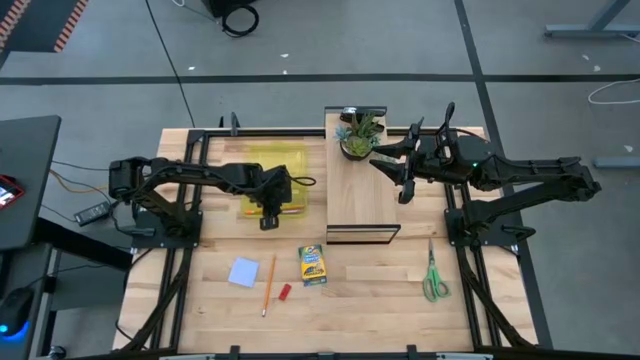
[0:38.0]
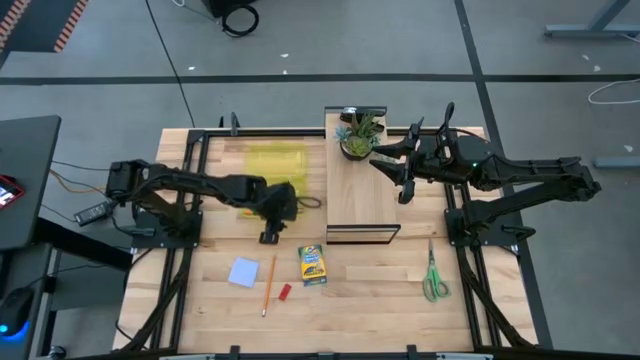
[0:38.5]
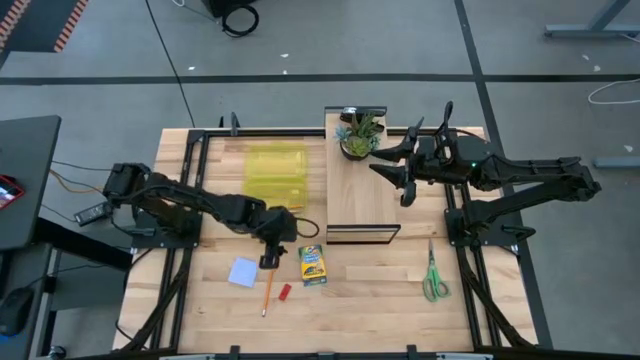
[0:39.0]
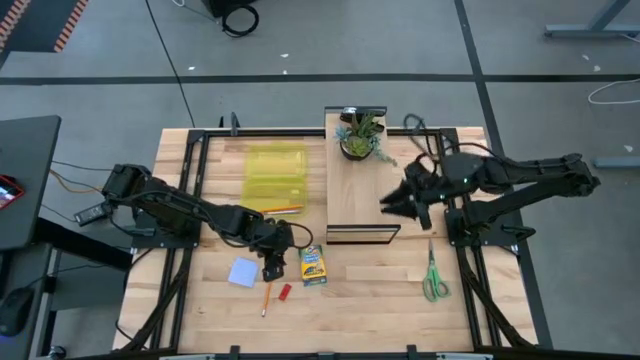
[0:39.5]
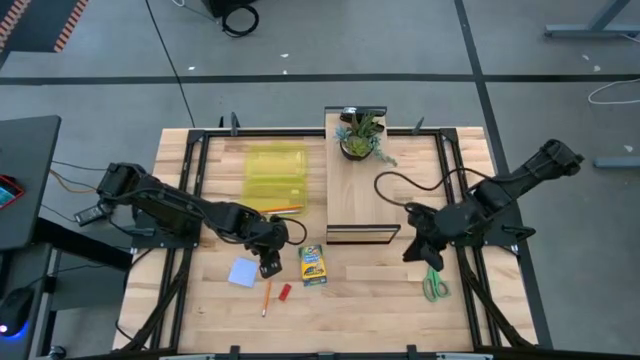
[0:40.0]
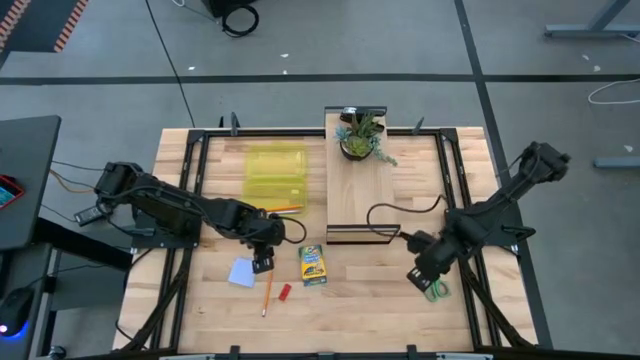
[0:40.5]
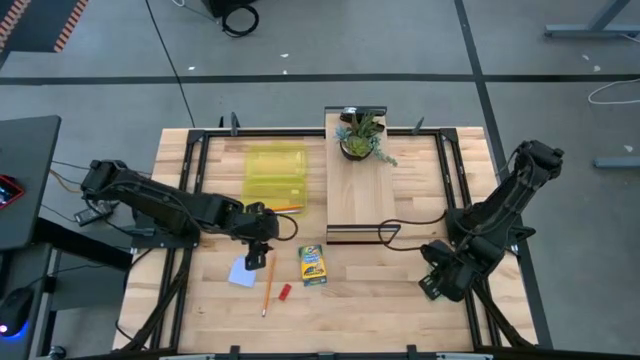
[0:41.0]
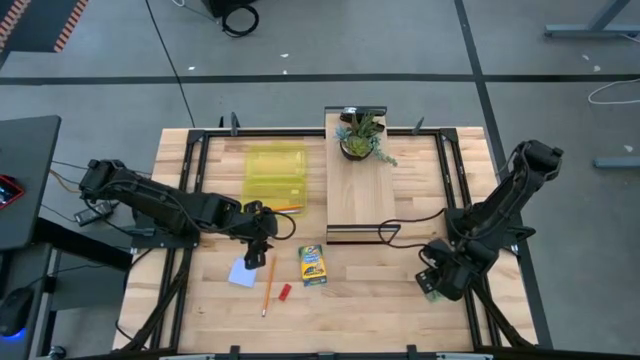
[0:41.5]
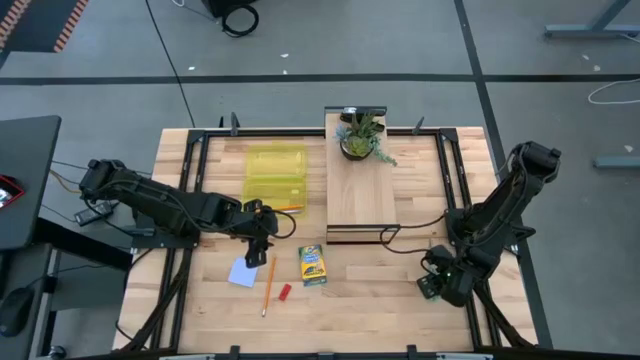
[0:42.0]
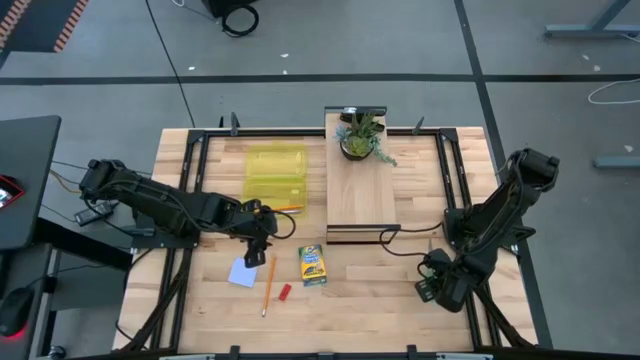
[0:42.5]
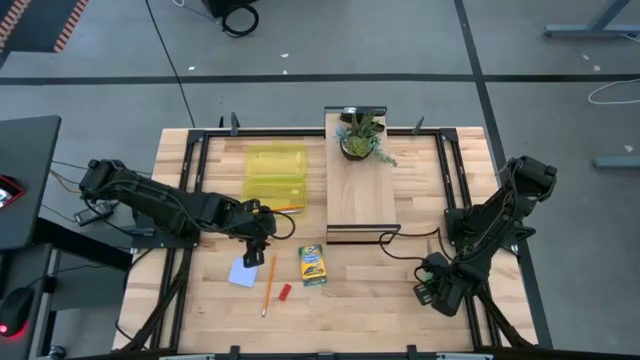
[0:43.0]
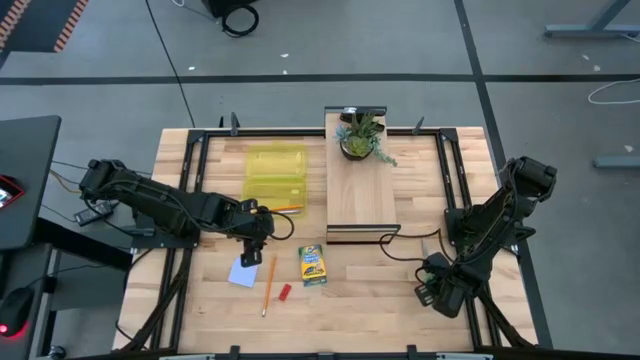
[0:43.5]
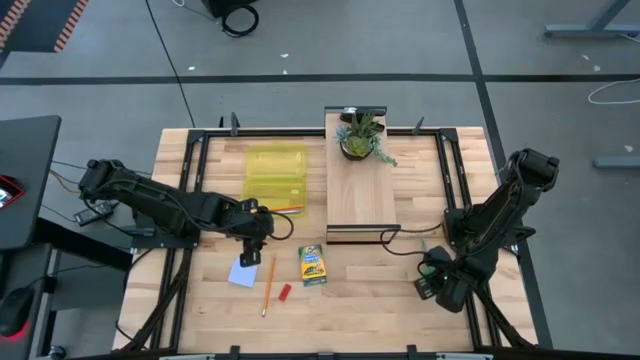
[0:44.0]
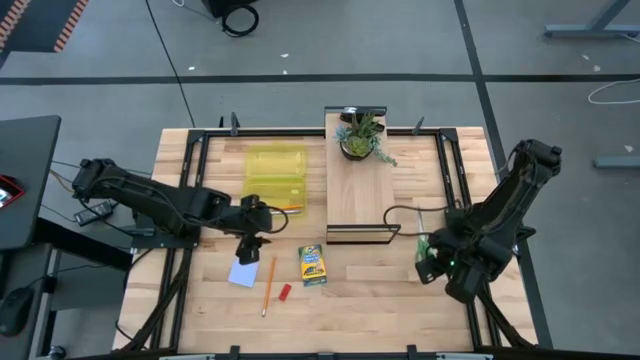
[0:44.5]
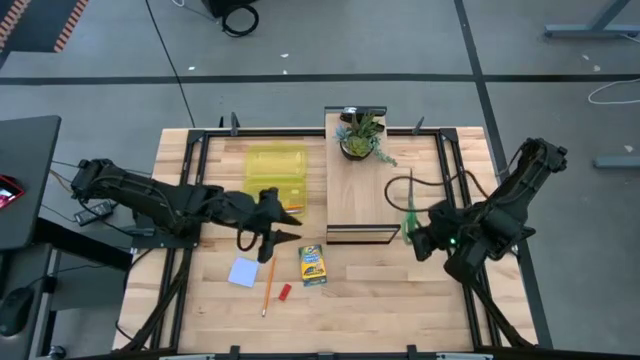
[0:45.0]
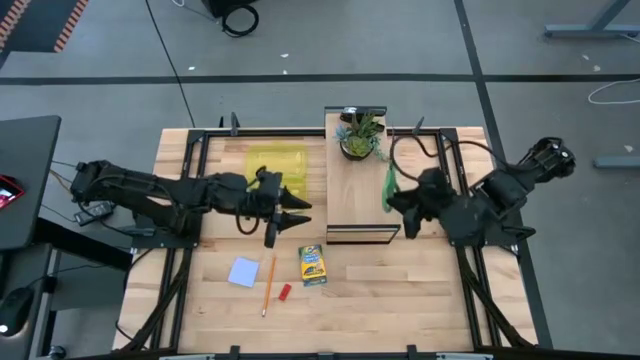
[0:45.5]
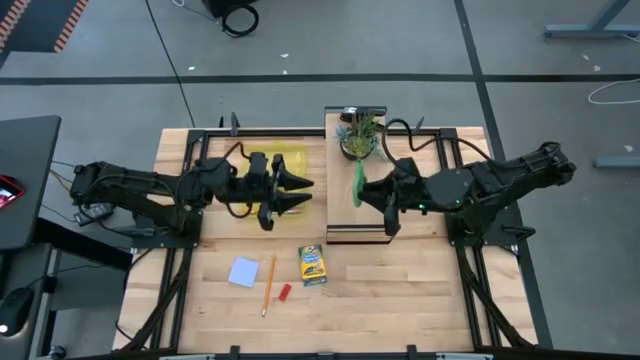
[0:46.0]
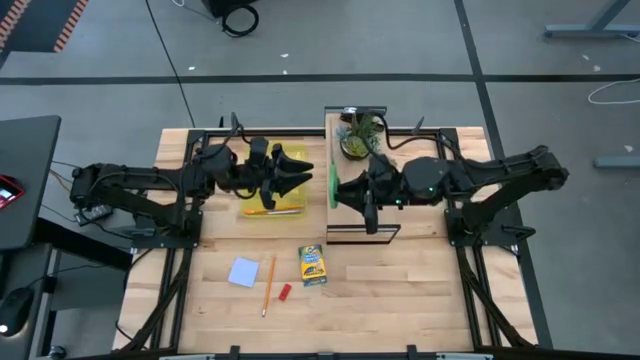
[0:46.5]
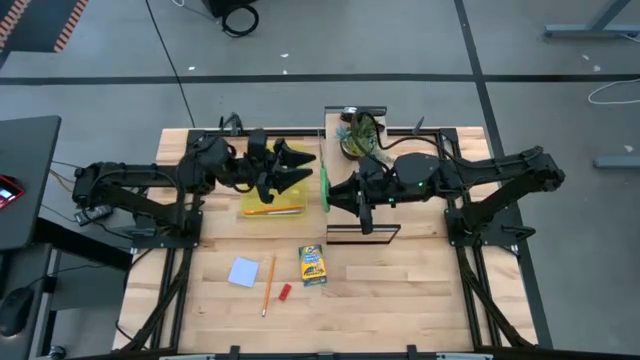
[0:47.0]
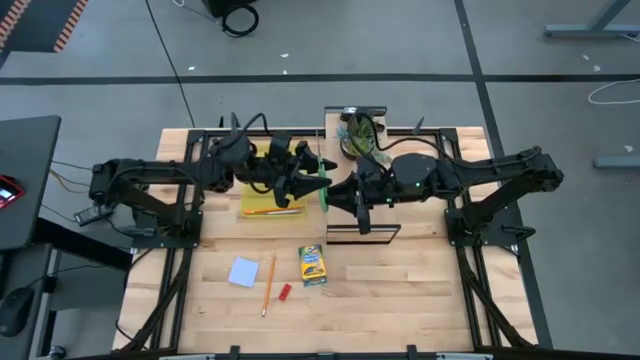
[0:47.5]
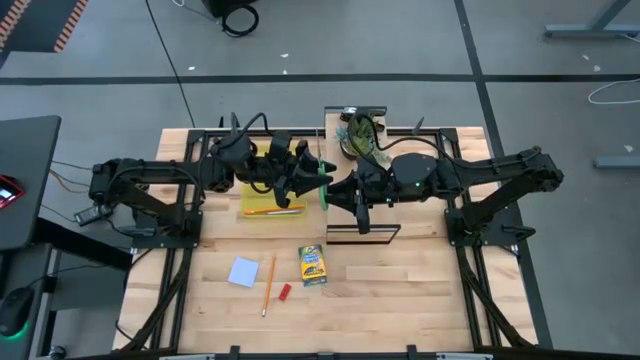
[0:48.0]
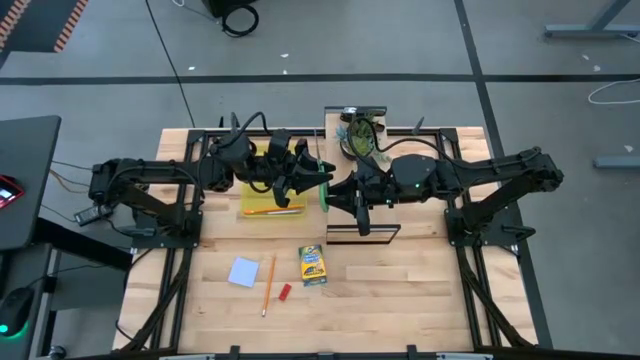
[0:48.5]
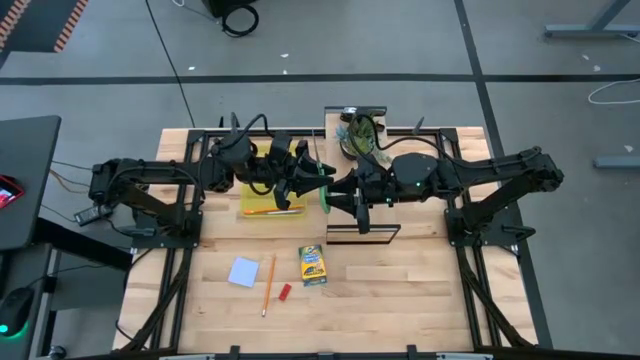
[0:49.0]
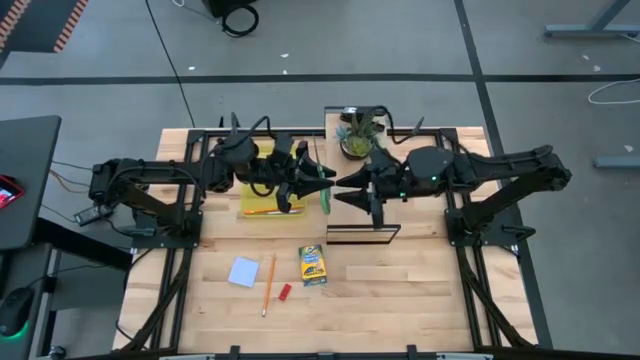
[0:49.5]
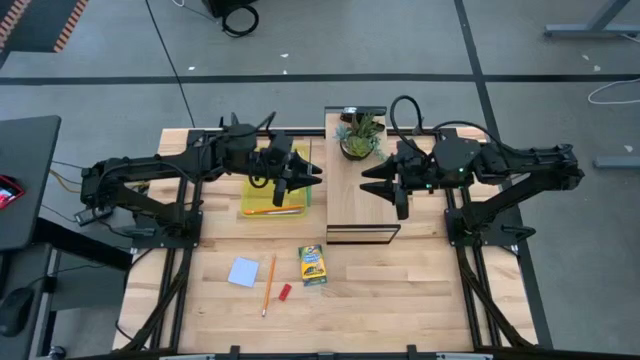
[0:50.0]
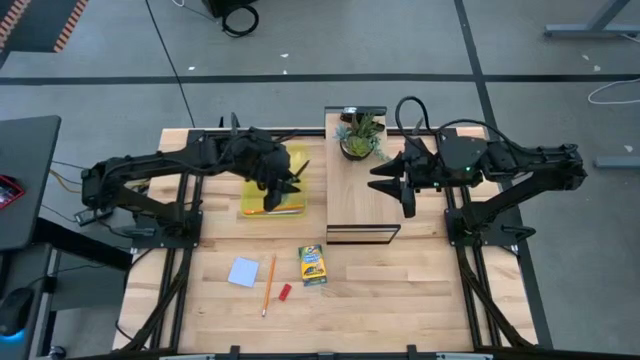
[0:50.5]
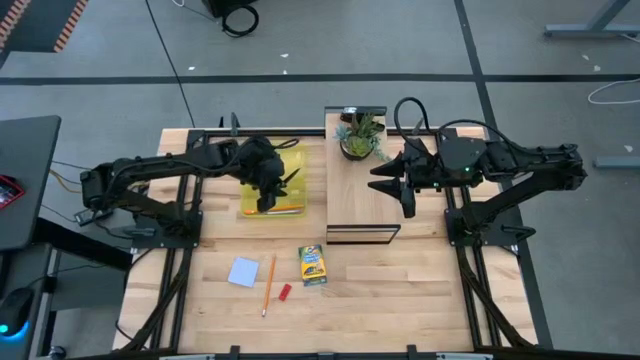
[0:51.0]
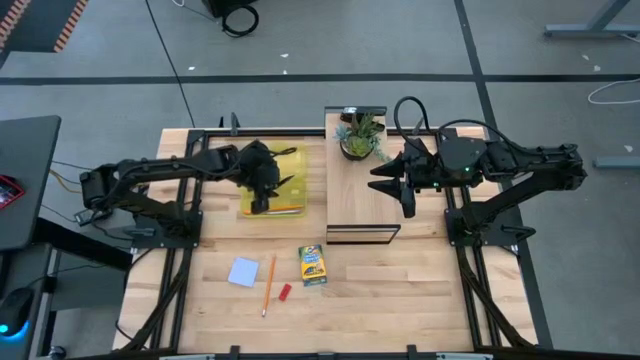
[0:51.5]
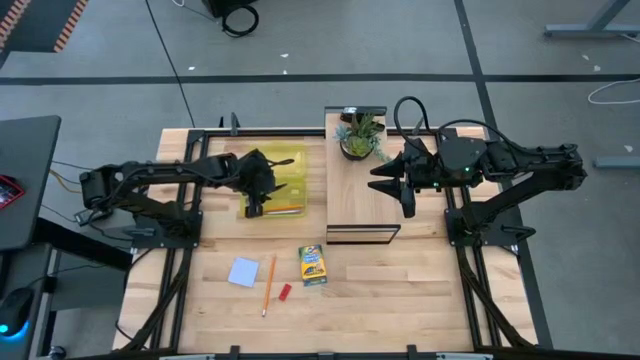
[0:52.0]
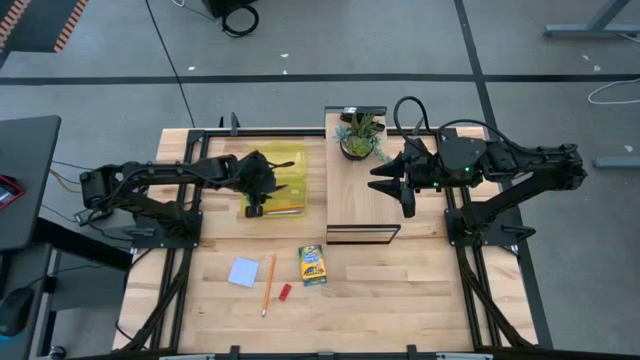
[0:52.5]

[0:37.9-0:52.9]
Task: Pack school essentials
Put the green scissors into the yellow supply box

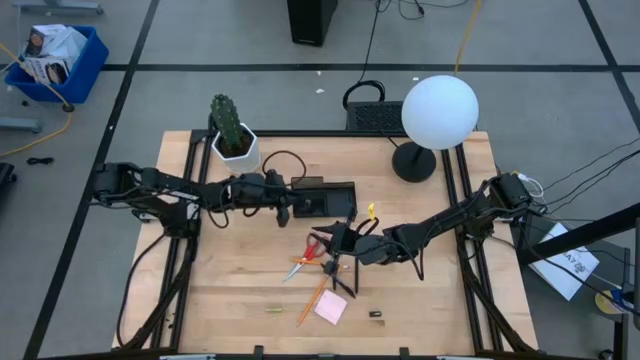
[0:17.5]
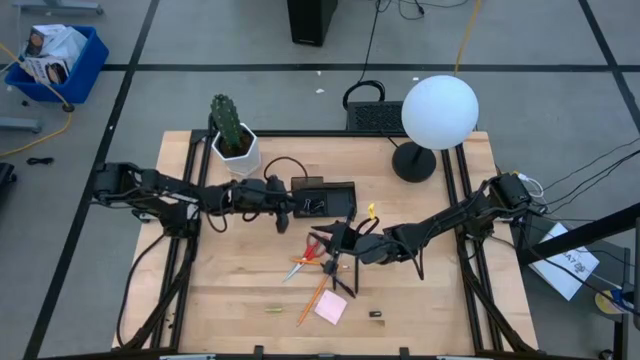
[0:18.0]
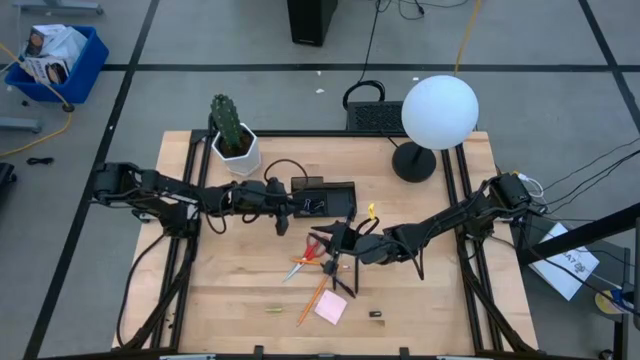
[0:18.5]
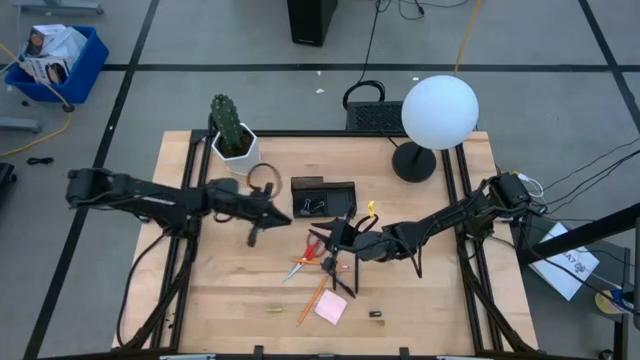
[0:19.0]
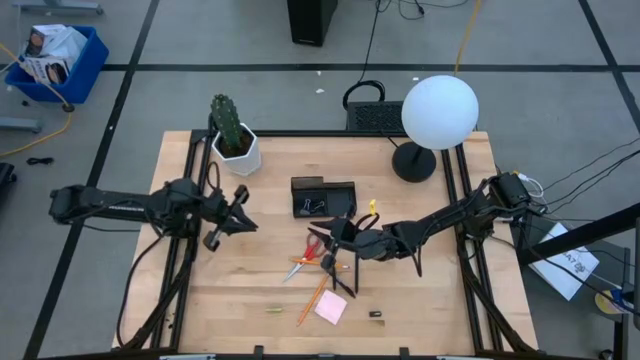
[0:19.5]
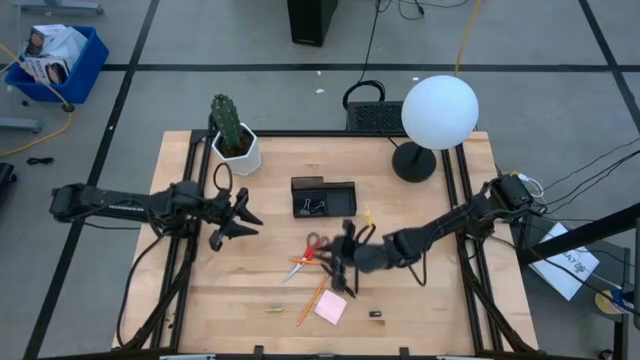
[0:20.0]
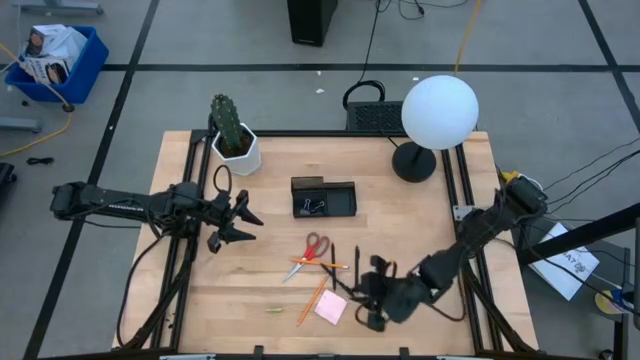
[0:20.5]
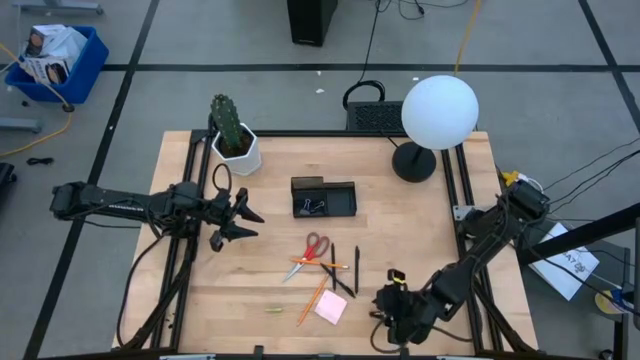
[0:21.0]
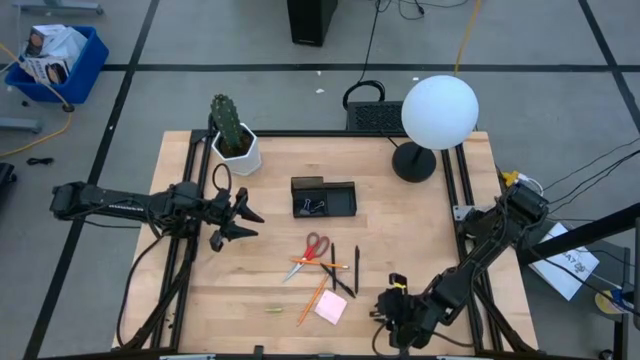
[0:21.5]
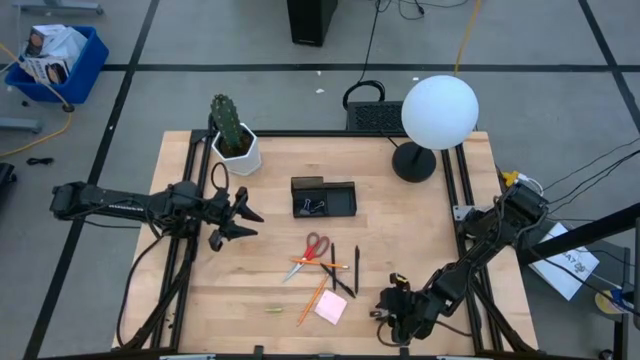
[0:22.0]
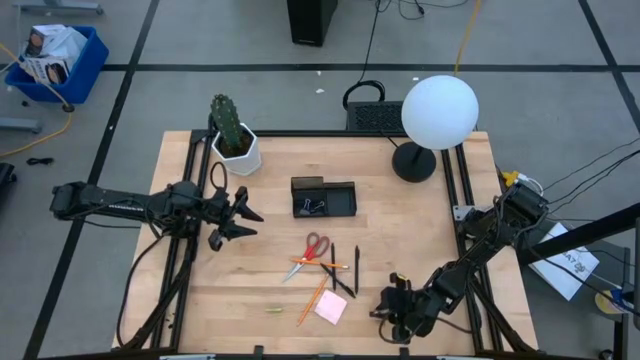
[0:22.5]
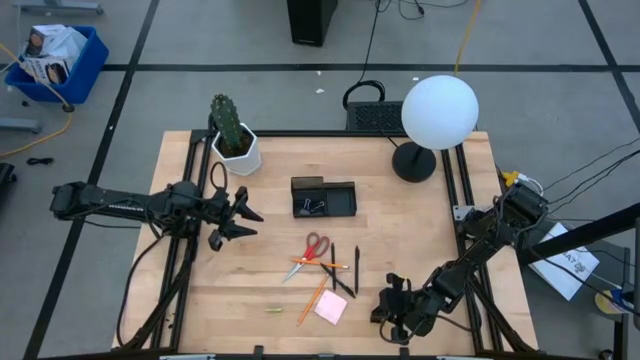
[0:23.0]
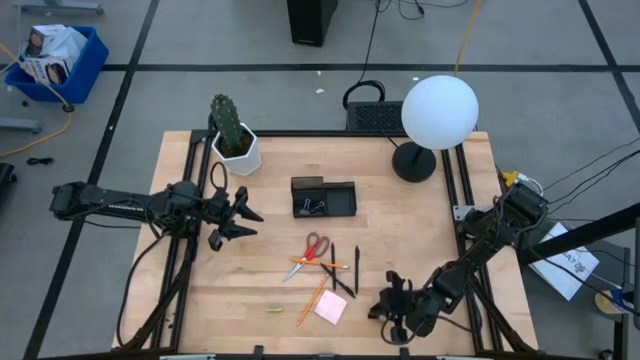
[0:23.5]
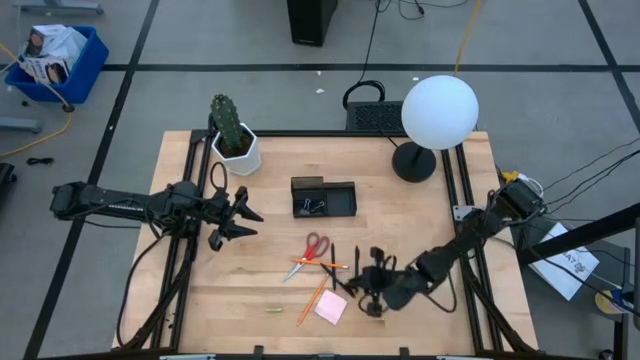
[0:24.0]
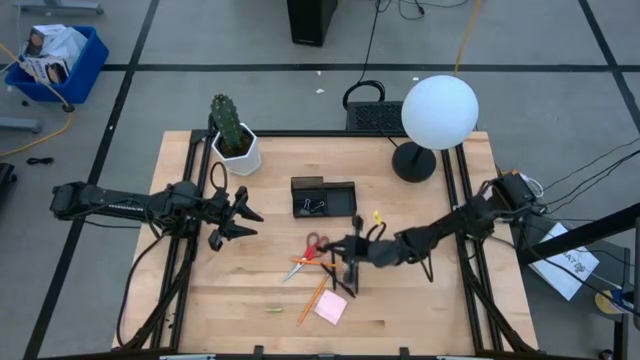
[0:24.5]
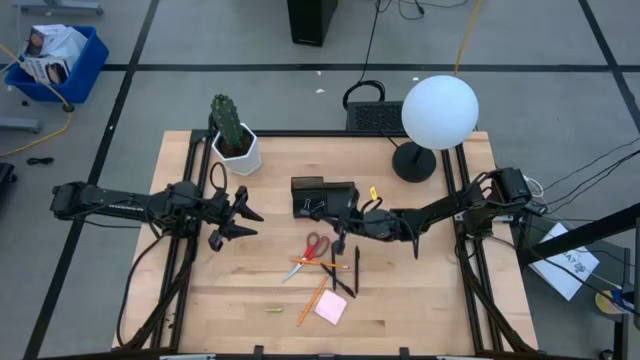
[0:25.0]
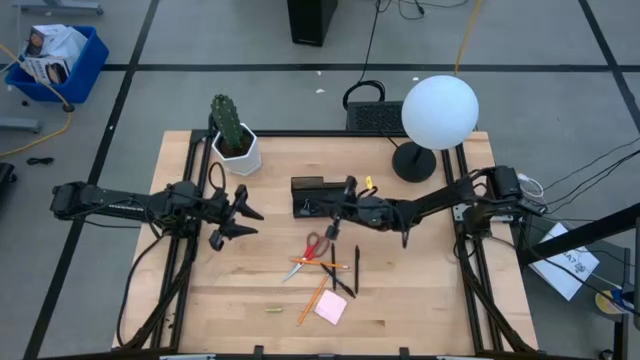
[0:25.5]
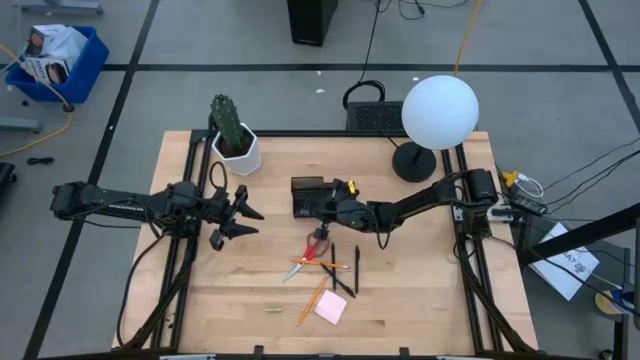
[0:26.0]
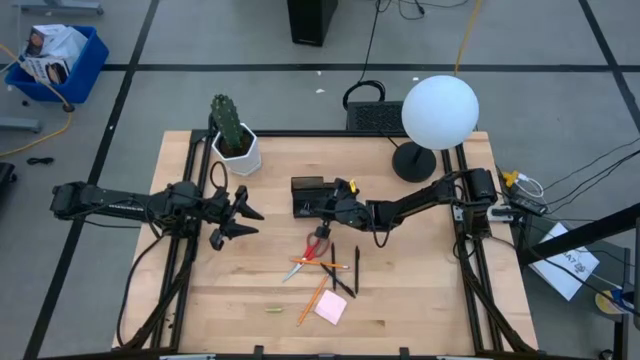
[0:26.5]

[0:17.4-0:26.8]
Task: Pick and place office supplies into organizer
Put the black binder clip into the bottom left of the desk organizer
